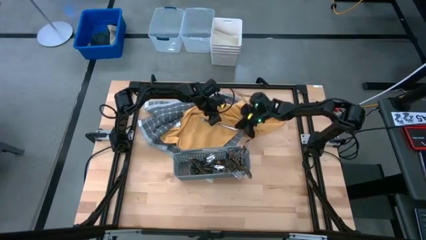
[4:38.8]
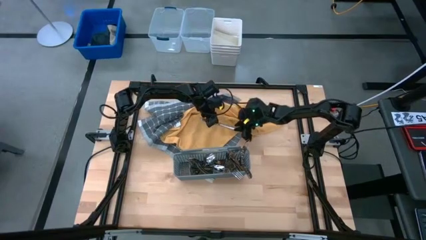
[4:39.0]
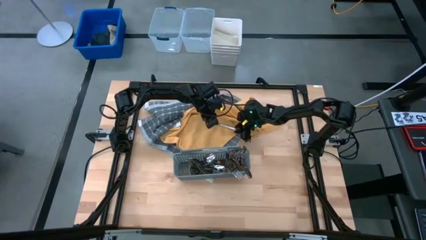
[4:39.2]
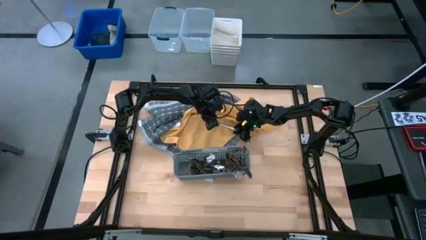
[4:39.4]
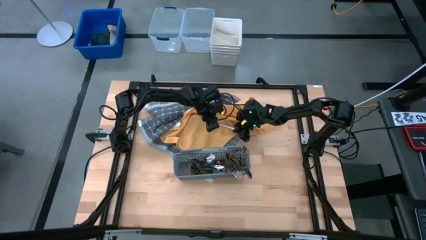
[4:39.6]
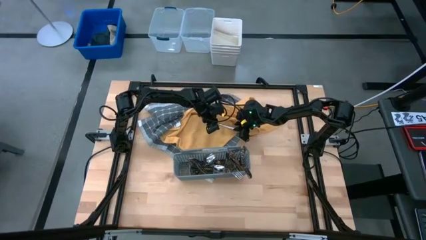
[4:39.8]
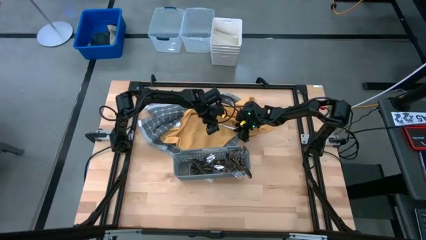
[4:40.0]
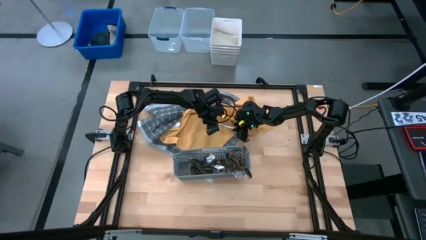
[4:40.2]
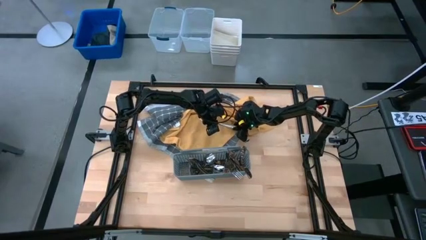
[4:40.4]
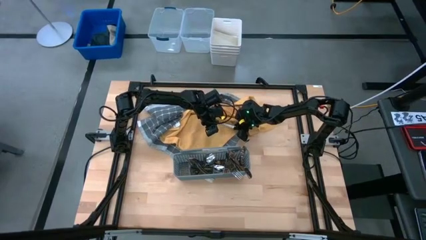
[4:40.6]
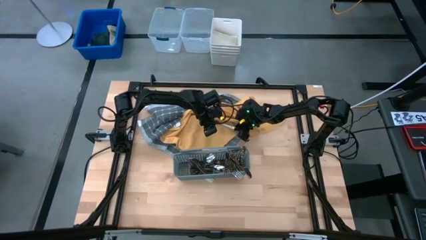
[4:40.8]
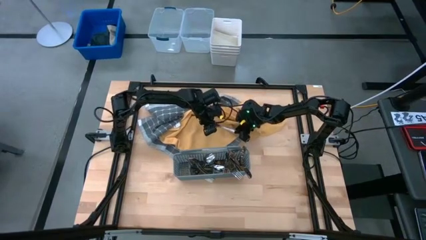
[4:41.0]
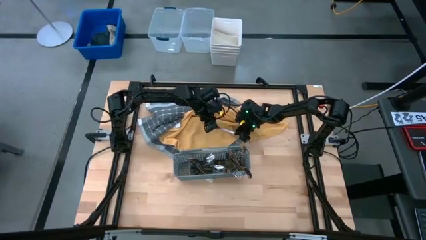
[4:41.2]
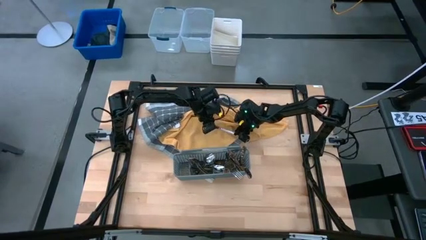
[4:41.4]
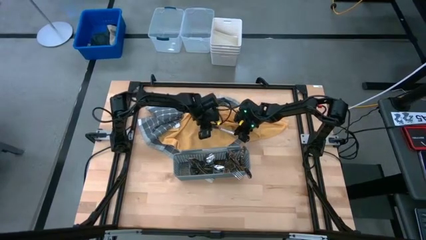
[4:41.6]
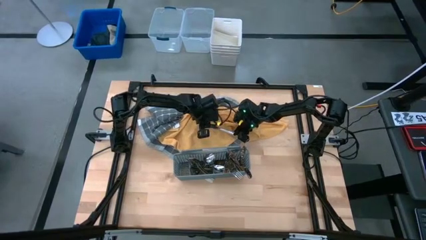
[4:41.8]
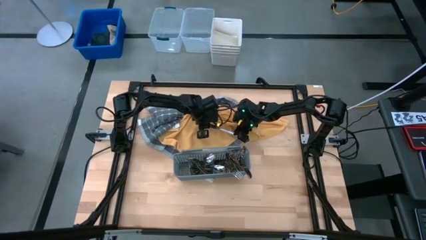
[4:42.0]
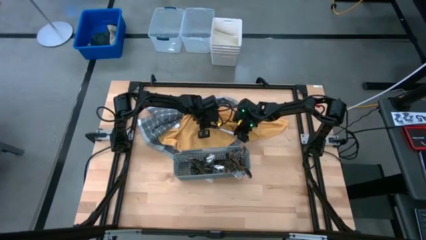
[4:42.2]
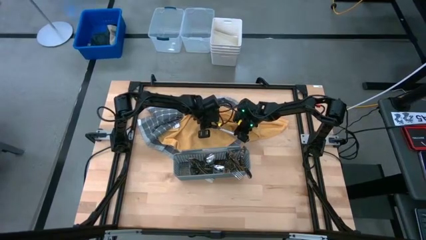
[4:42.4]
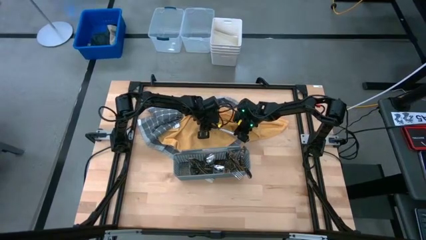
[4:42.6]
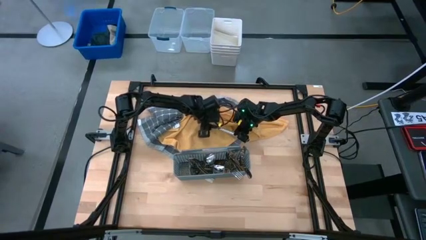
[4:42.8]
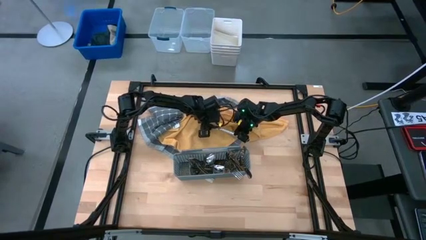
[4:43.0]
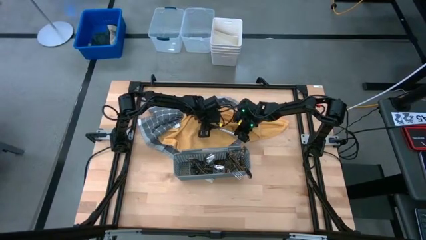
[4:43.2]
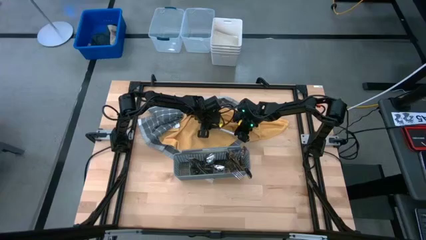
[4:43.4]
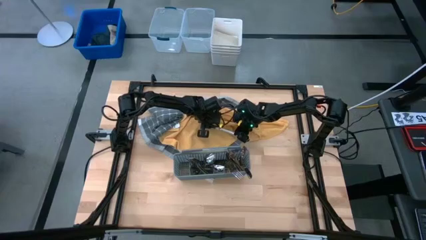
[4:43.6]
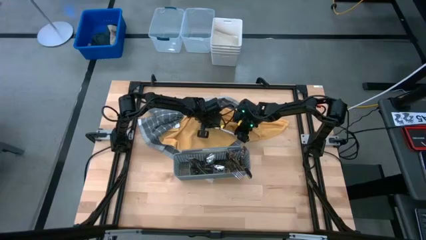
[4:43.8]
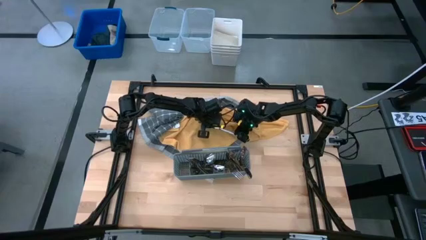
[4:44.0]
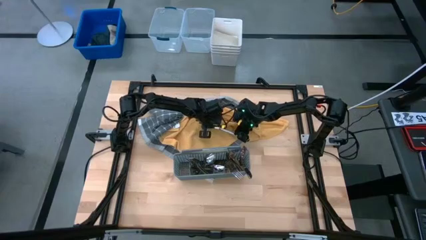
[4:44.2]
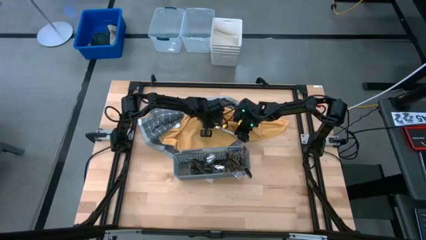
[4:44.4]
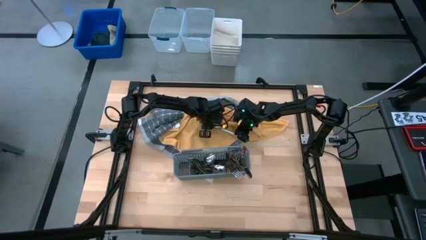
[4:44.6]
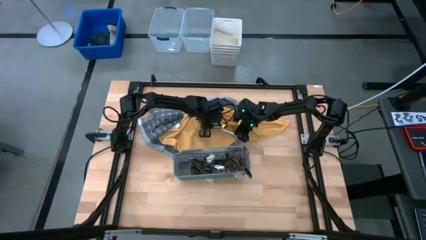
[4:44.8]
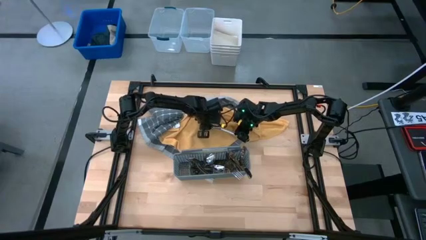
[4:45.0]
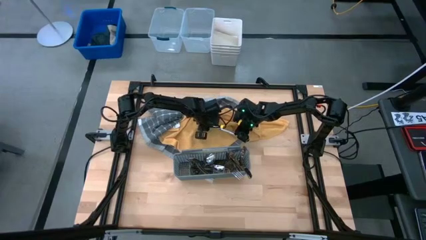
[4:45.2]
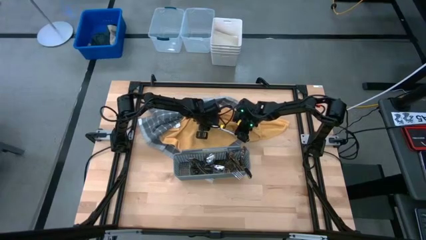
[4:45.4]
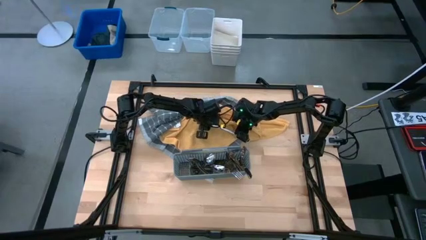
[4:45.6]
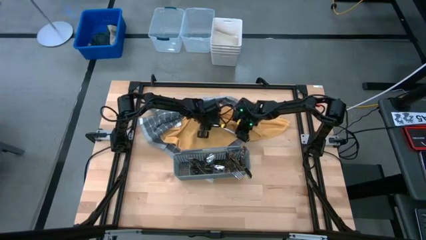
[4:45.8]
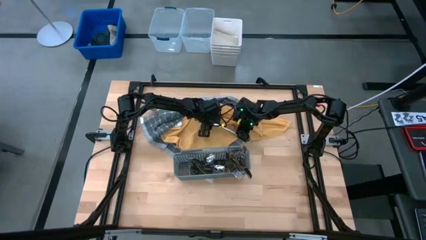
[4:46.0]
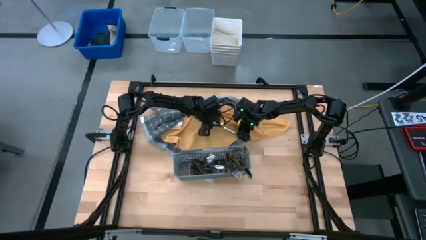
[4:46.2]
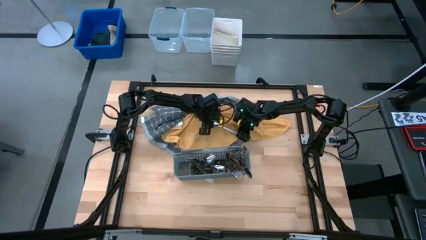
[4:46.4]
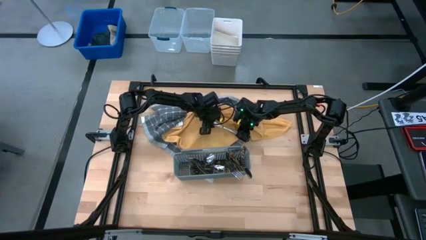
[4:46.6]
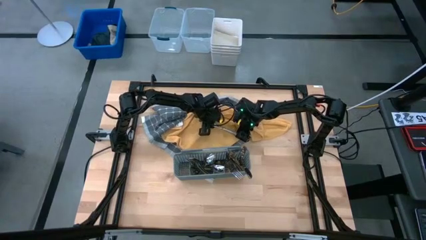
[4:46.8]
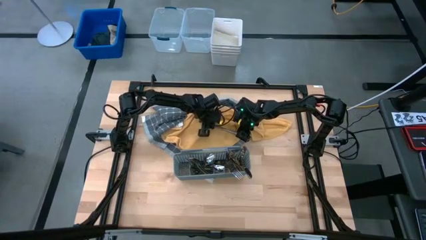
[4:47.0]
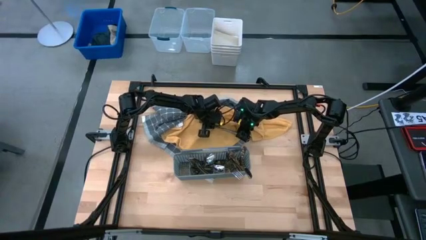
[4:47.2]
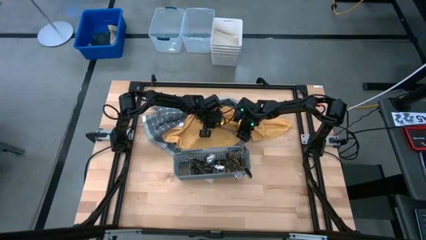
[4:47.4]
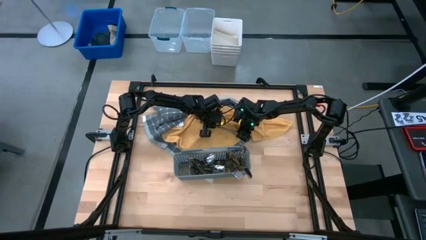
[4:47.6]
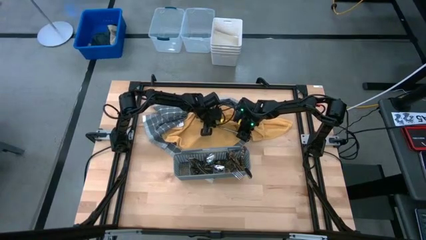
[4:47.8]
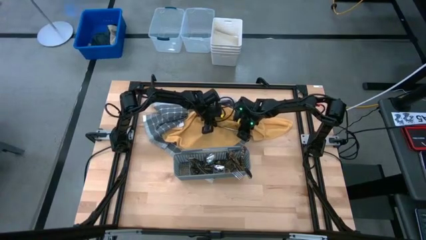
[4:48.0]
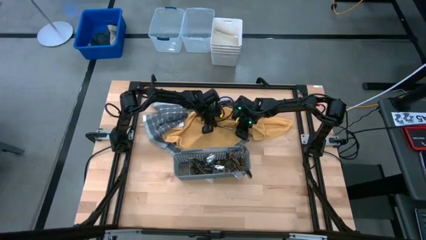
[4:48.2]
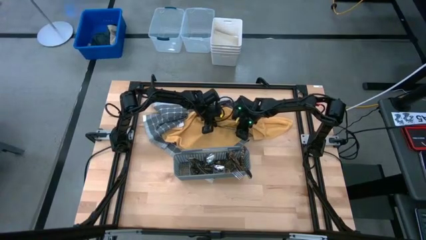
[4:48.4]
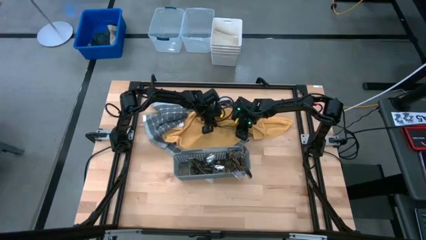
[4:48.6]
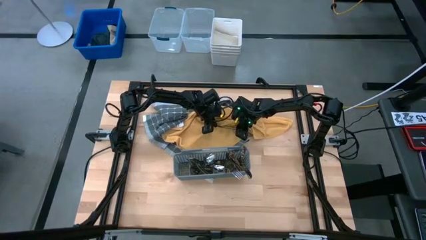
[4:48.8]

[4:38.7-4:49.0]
Task: Sort silverware
Put the silver knife into the gray silverware basket

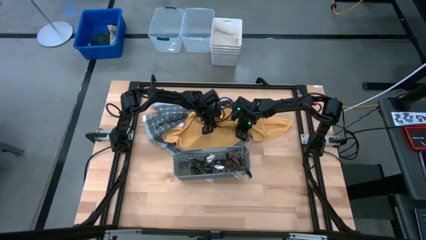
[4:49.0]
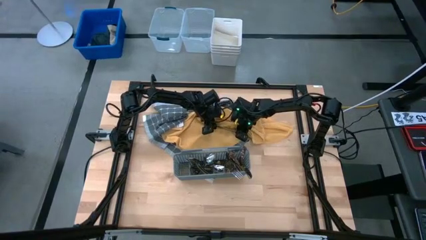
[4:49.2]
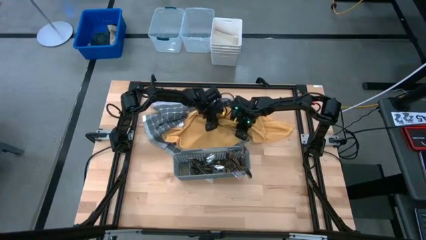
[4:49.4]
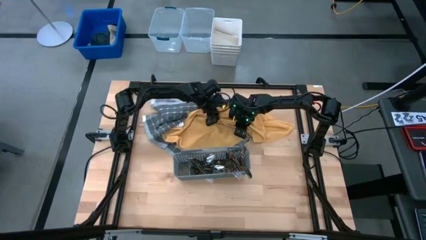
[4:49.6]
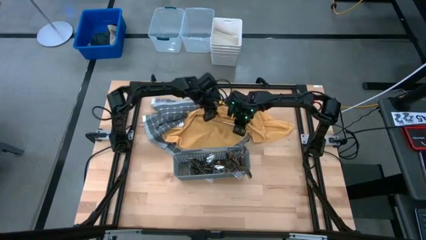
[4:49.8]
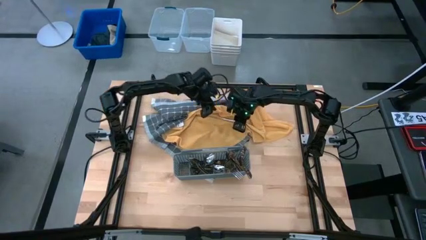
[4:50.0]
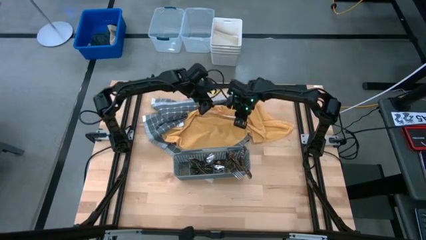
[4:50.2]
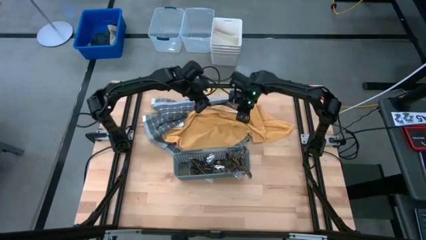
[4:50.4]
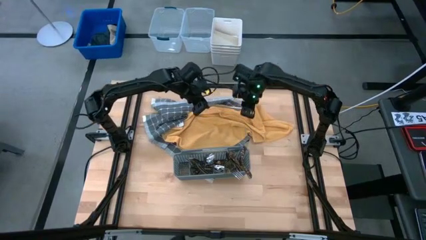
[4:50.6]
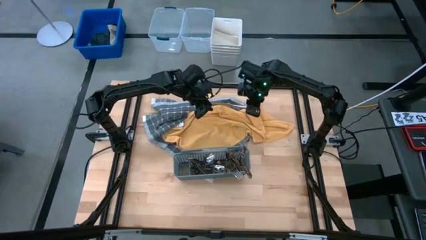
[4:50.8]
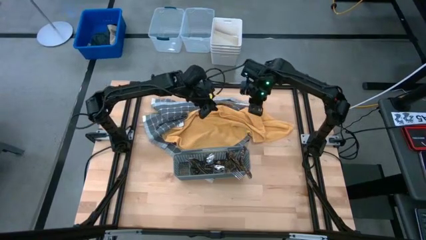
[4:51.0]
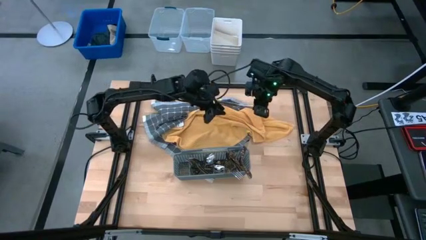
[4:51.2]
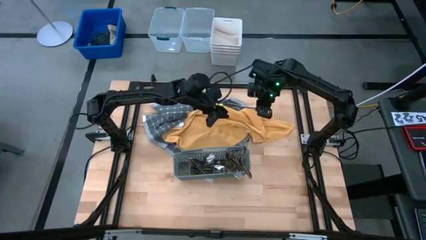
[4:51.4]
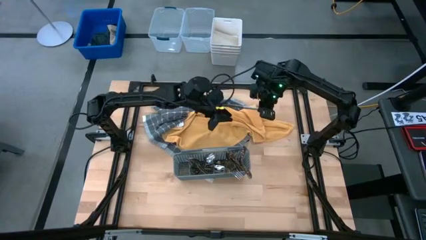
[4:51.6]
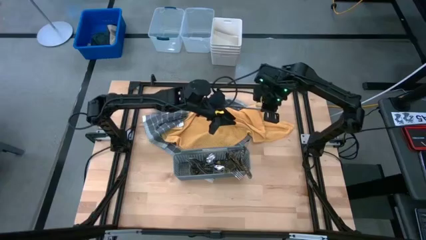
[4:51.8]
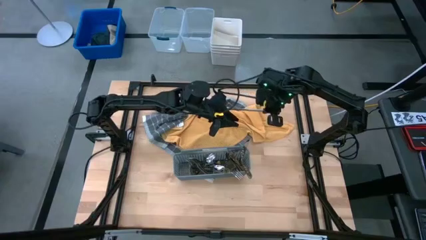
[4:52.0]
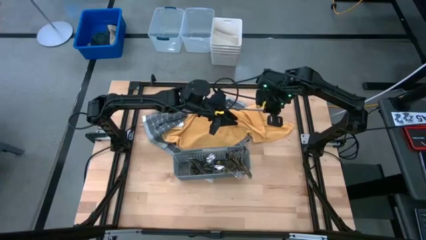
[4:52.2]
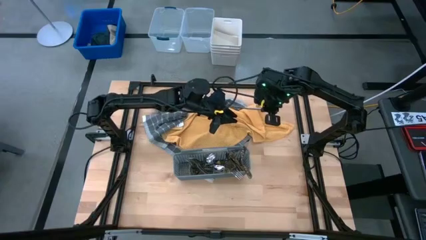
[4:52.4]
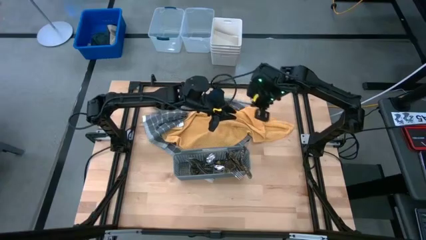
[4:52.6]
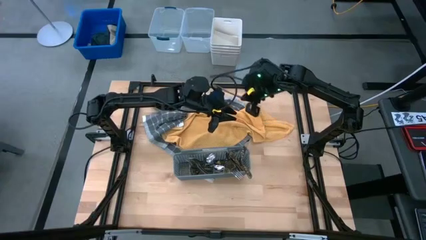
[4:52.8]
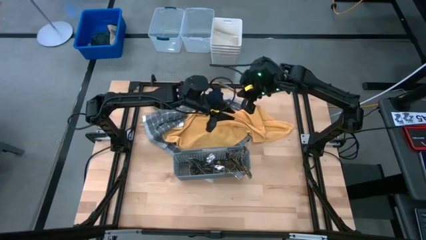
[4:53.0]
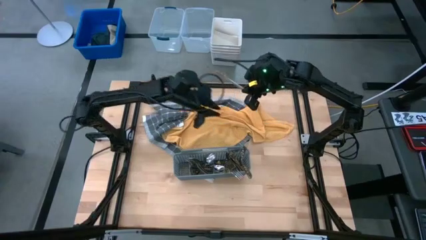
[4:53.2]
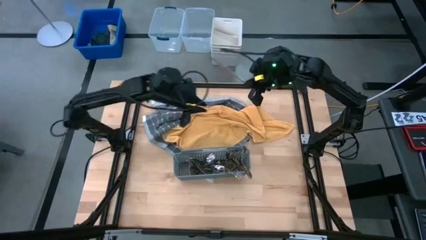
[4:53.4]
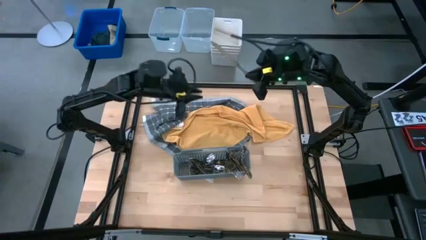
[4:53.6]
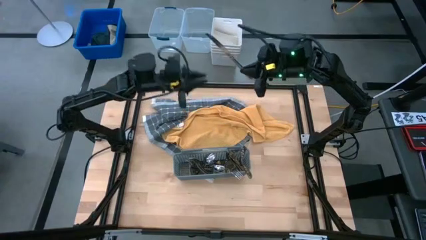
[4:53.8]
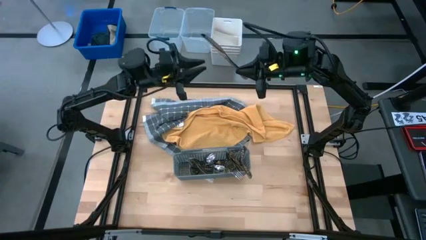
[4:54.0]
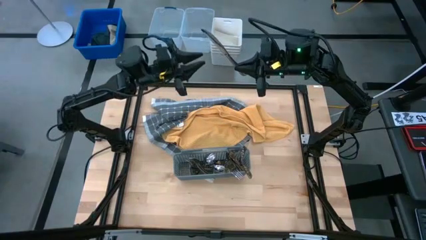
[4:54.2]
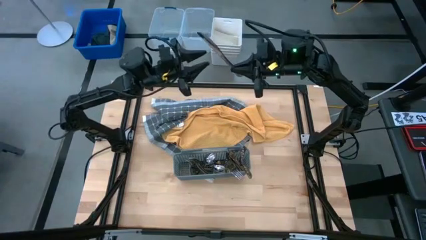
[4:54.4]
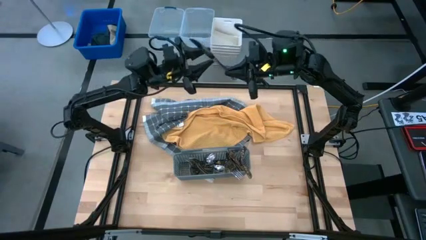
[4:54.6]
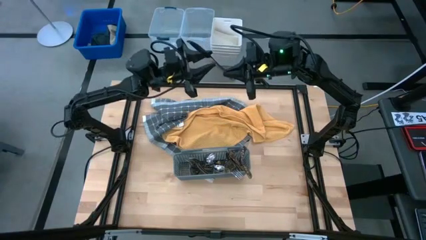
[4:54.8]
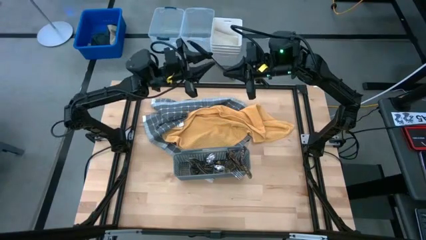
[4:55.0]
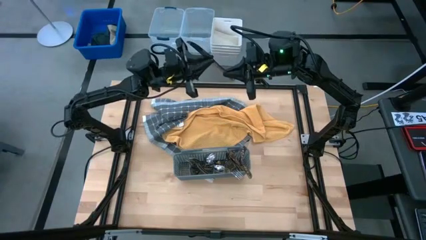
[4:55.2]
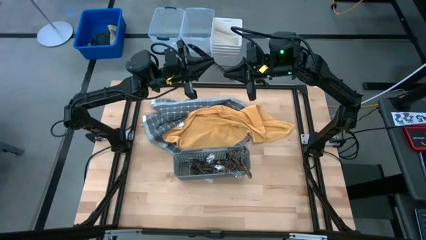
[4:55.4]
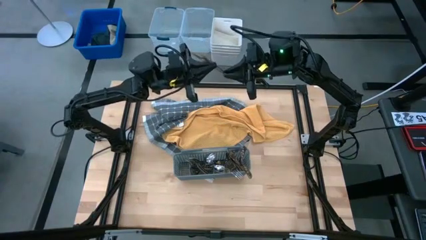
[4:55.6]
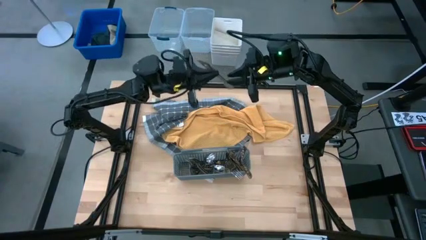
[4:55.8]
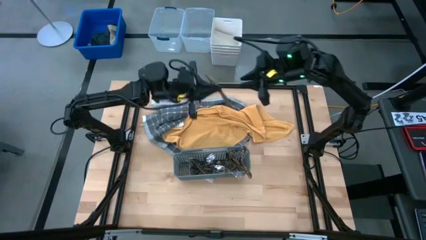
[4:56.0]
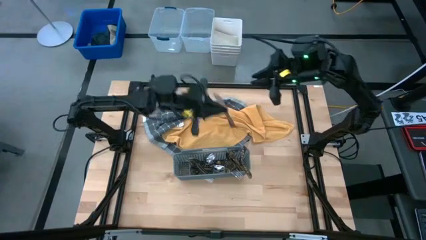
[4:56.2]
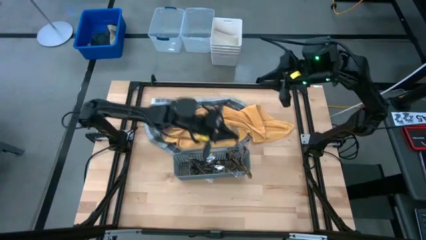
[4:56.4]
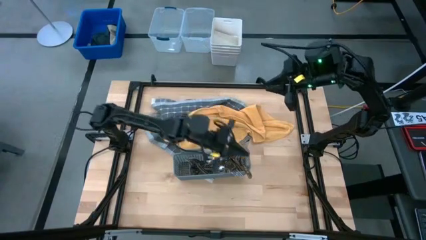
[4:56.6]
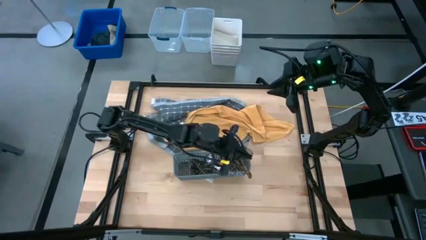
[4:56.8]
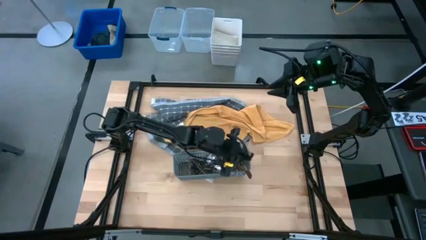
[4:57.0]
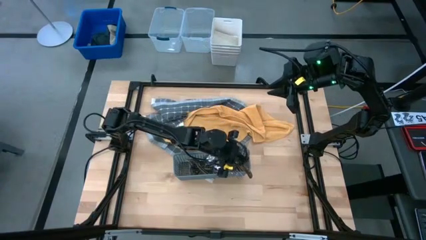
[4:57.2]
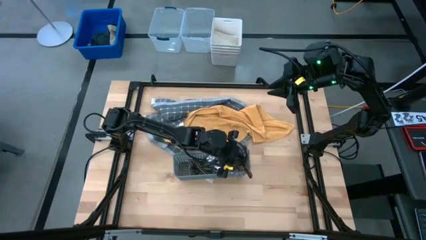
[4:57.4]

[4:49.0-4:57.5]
Put the silver knife into the gray silverware basket
